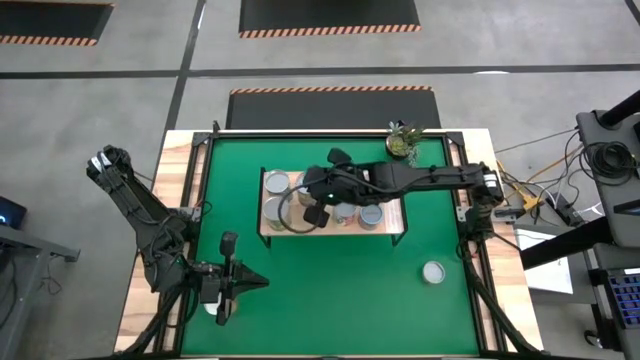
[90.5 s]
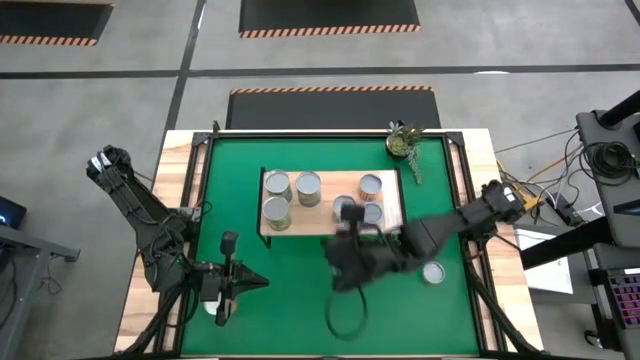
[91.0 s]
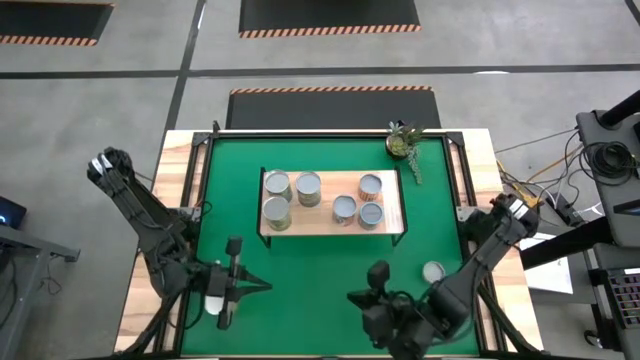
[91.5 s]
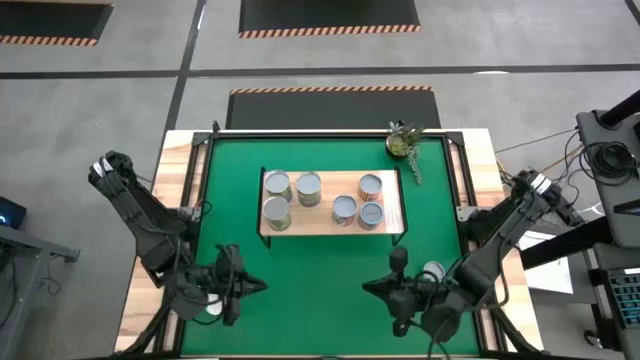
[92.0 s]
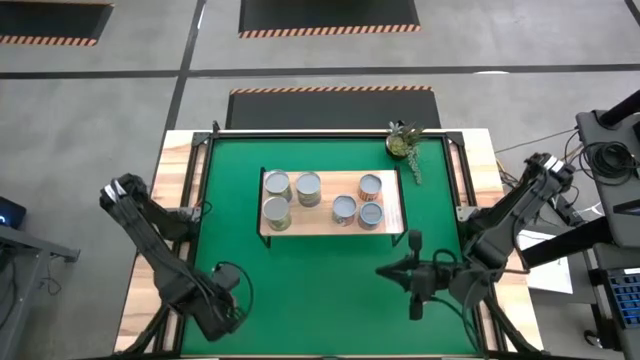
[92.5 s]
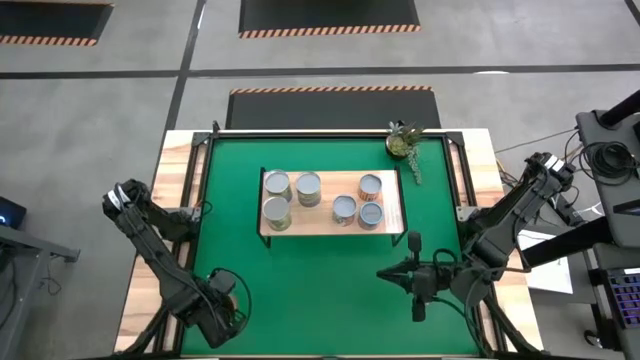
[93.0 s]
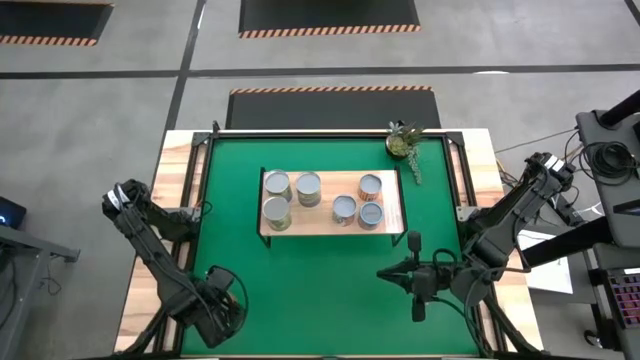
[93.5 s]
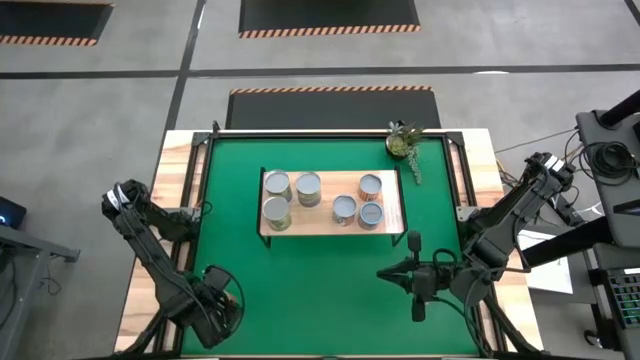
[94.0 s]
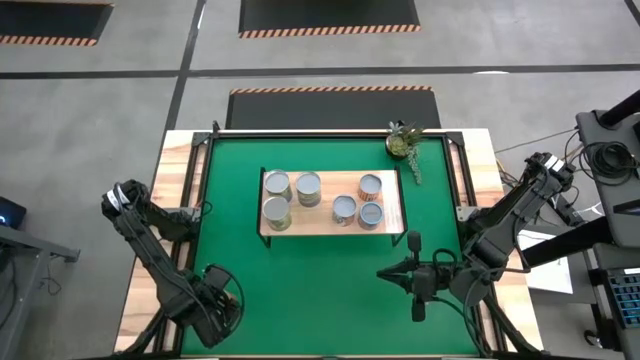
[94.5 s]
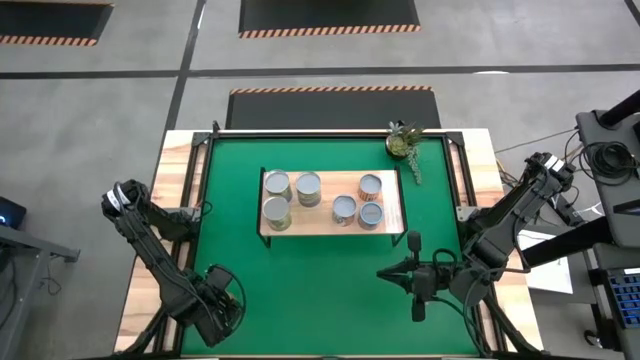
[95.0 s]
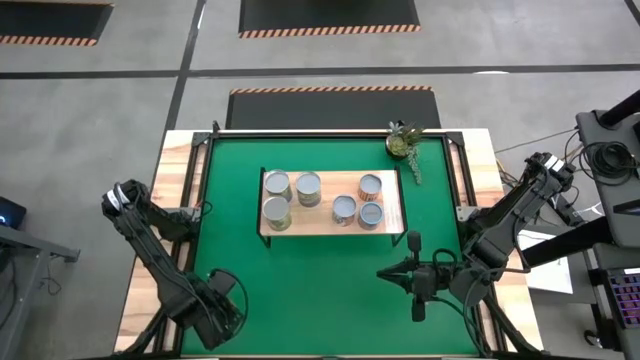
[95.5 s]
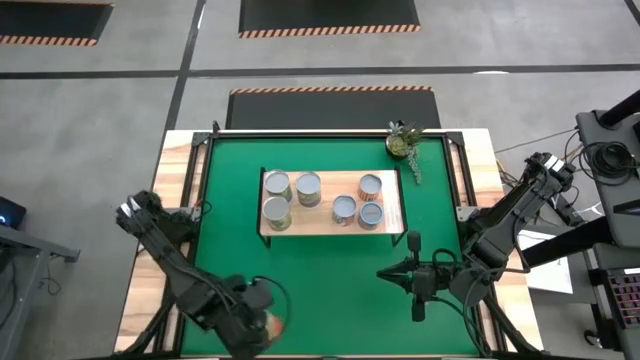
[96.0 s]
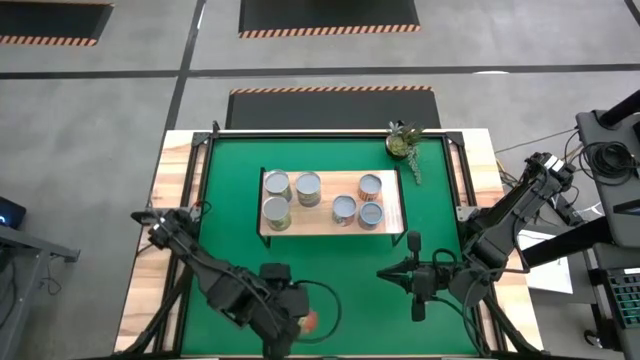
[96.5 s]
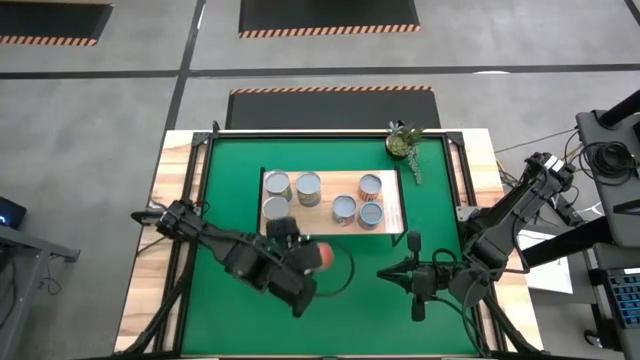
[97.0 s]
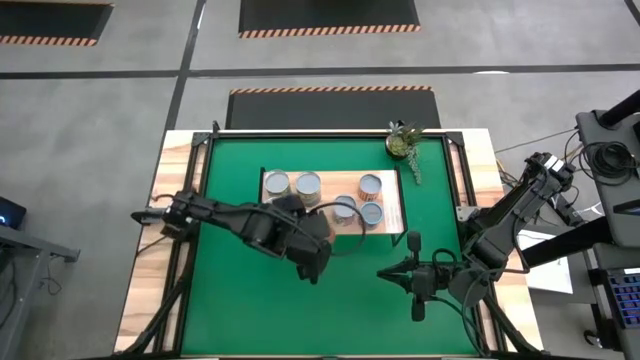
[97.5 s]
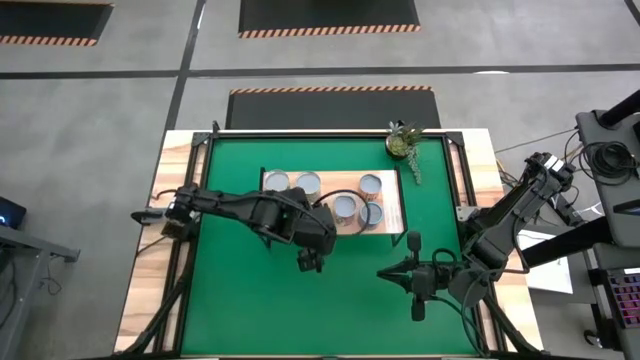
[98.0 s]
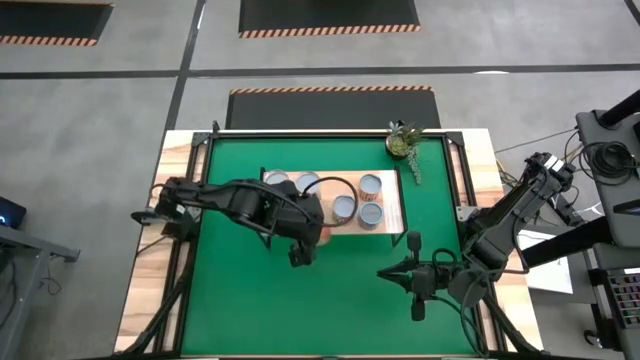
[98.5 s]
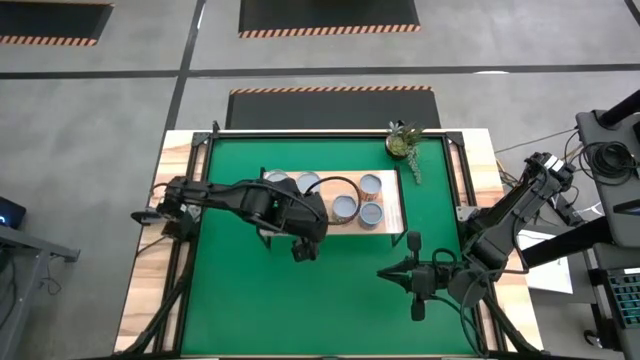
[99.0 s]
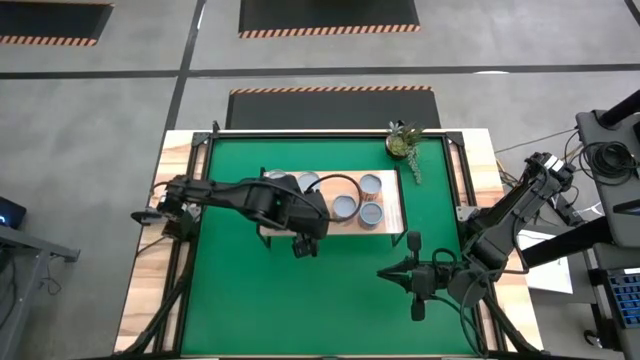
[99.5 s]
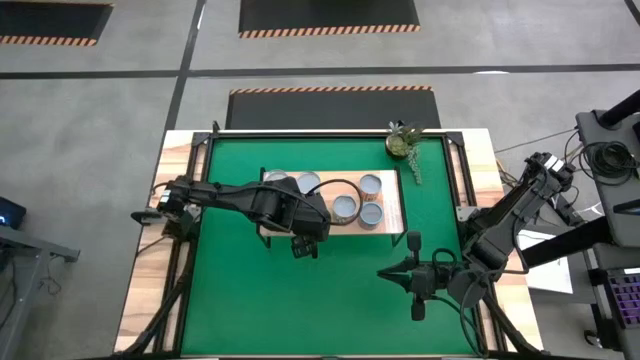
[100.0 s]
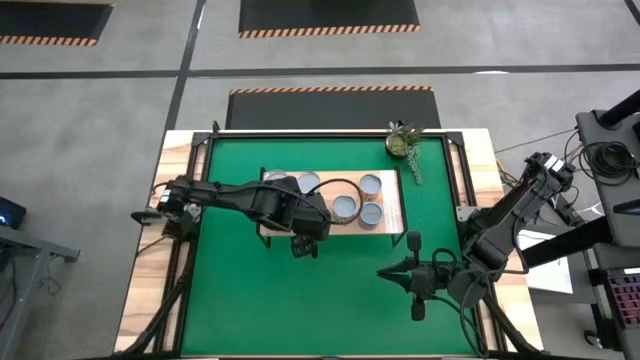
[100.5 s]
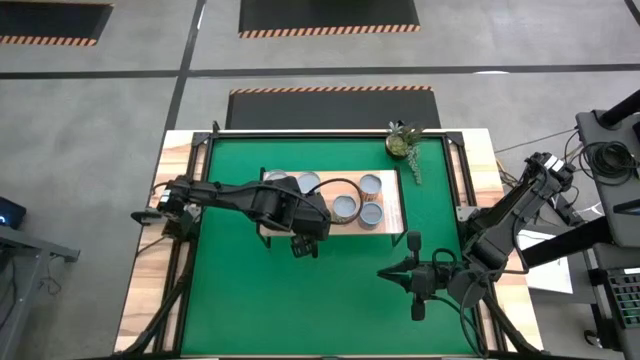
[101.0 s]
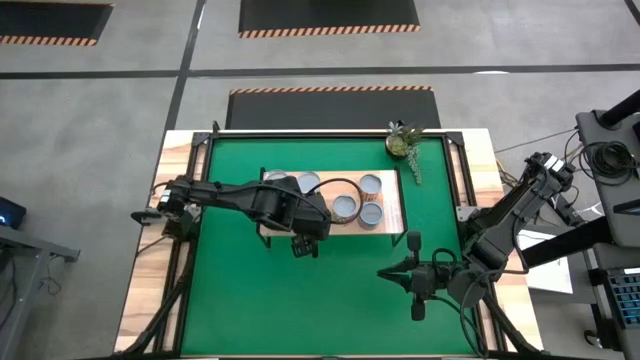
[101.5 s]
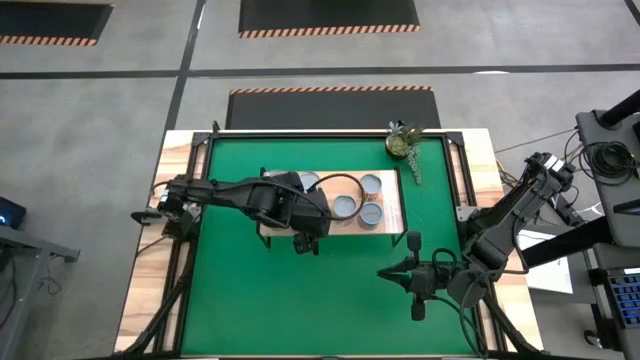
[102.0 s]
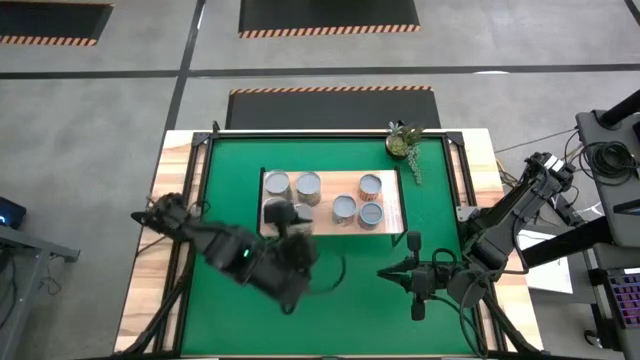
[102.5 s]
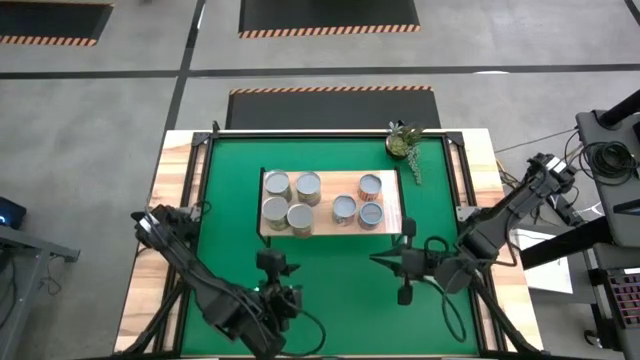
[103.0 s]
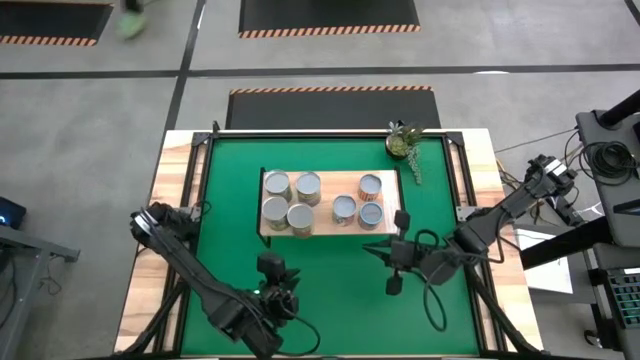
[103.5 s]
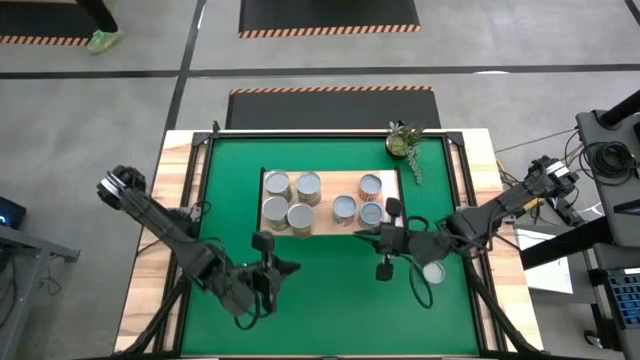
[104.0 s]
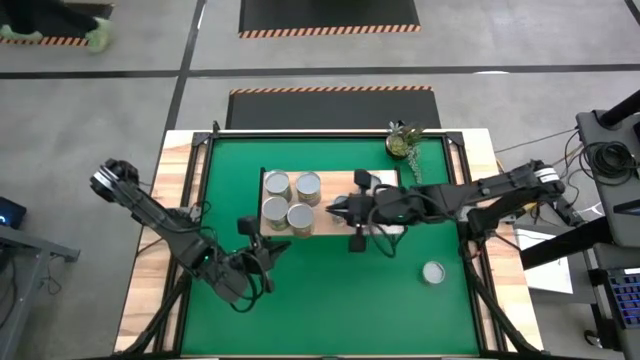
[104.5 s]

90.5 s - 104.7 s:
Task: Pick and place cans onto a shelf
Put the canned pineapple on the shelf

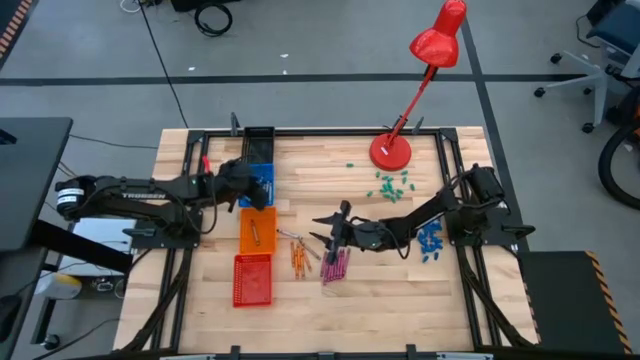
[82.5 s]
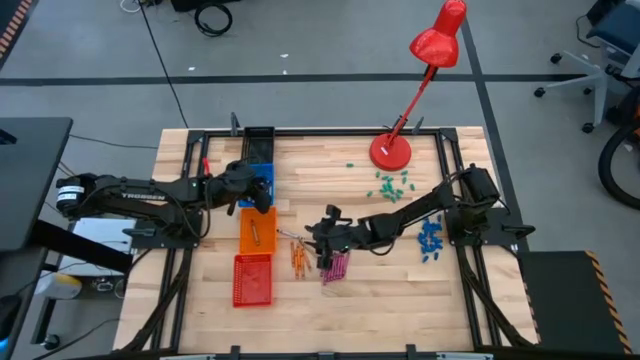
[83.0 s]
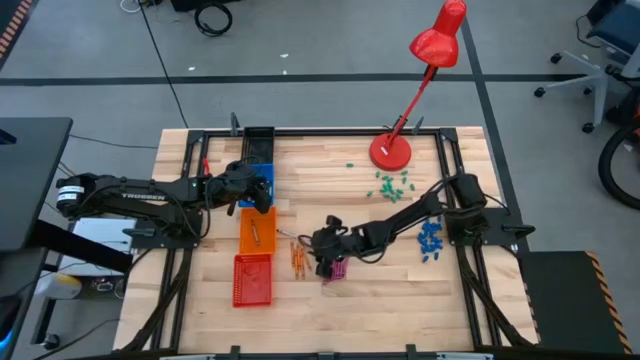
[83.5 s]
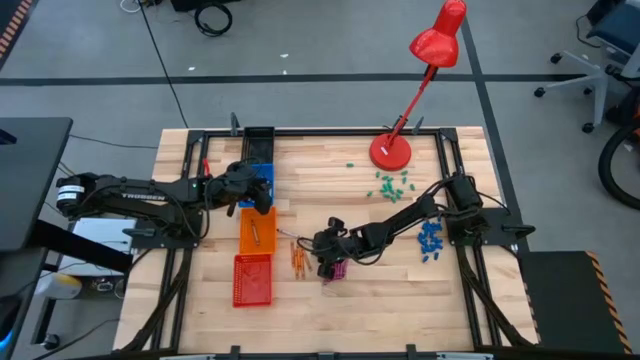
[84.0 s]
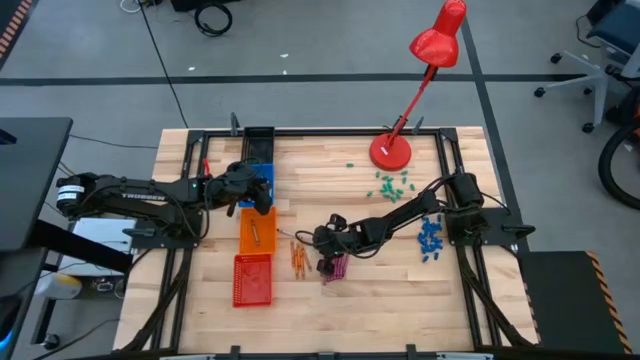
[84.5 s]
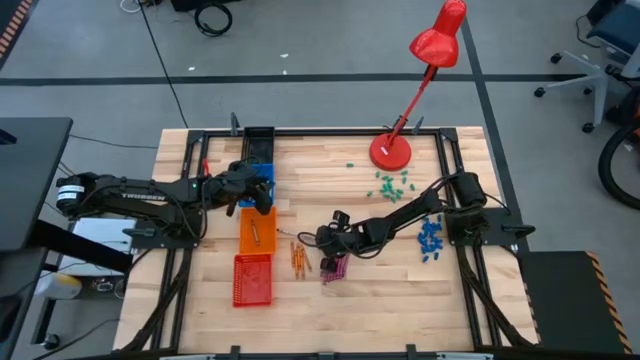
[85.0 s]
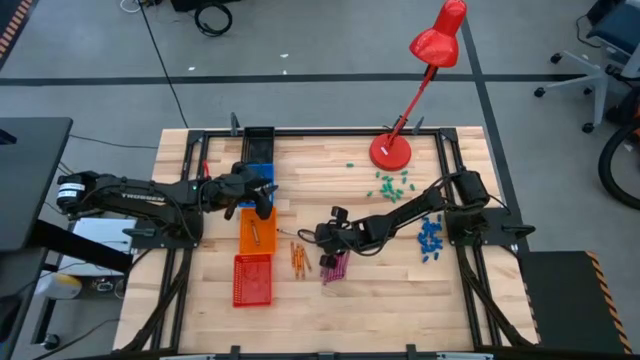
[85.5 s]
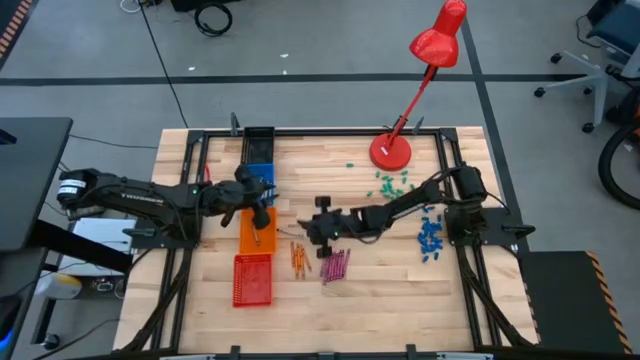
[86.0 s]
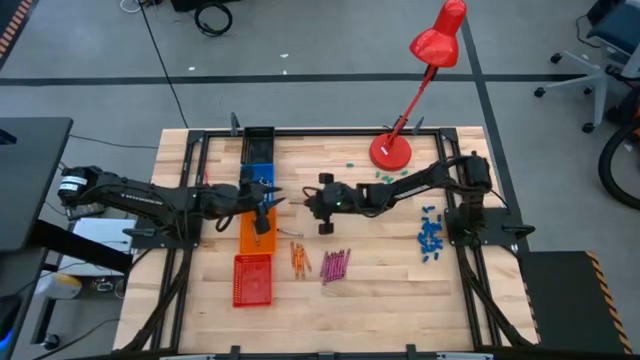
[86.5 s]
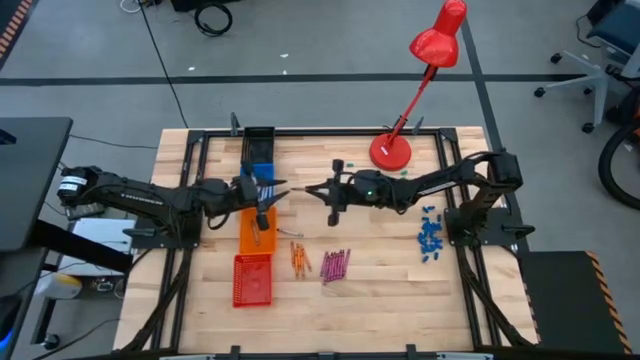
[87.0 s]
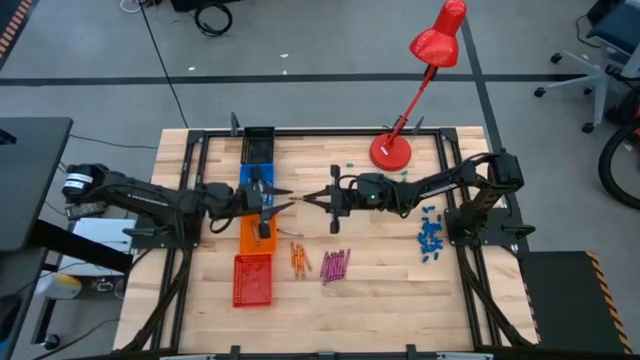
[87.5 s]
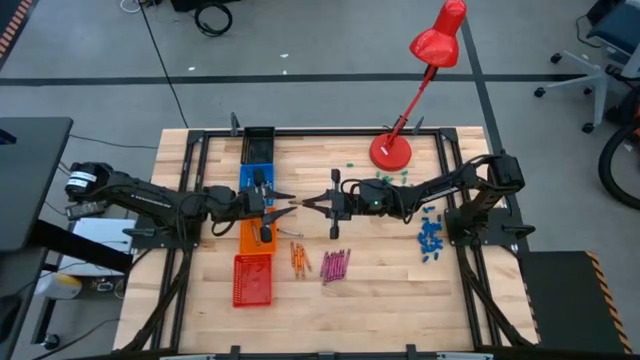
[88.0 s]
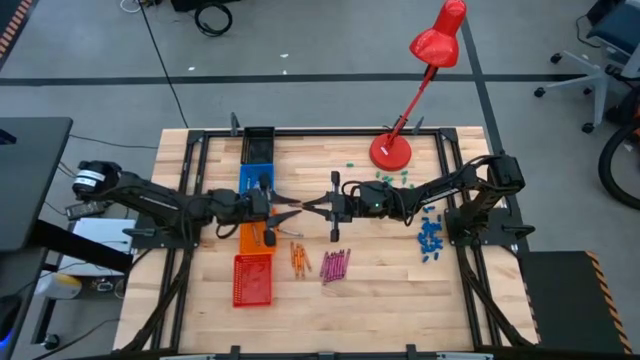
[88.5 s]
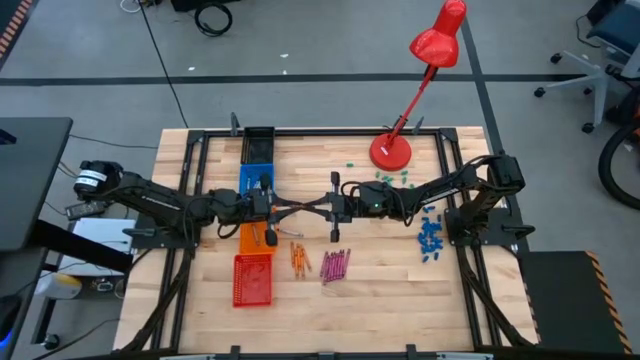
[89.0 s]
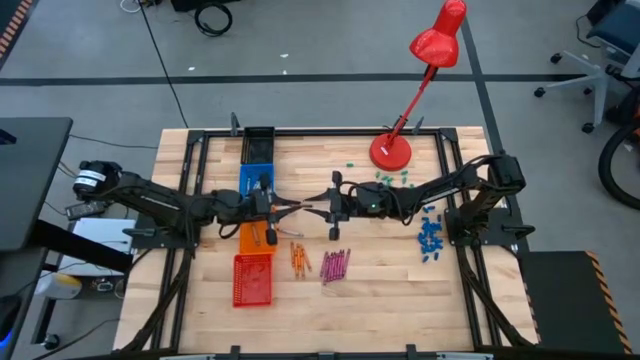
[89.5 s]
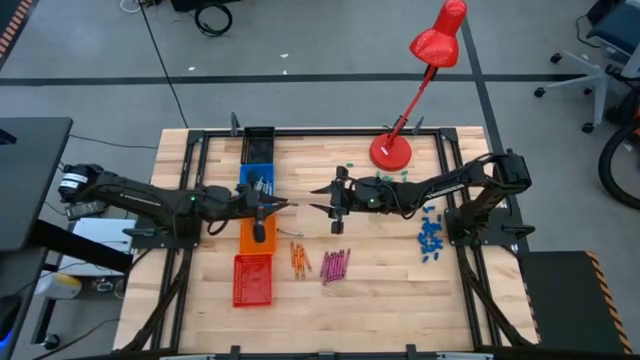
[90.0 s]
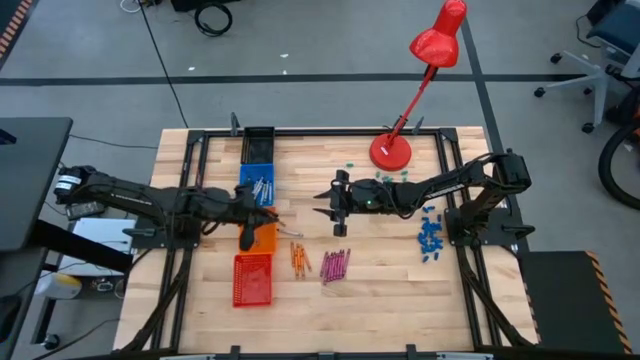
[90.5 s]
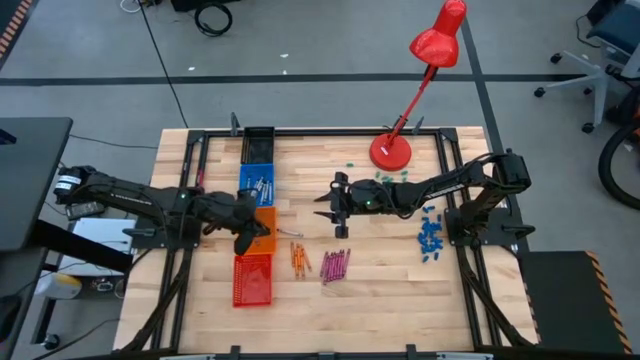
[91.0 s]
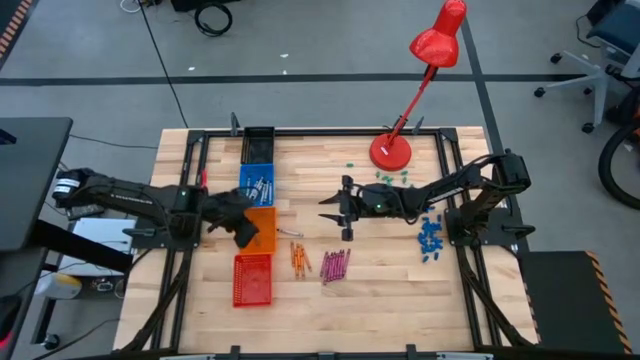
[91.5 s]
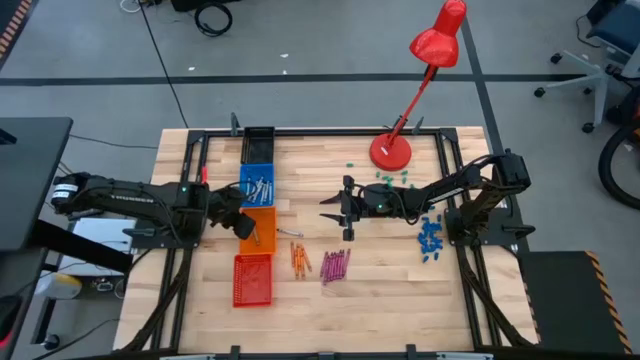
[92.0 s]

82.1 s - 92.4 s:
Task: Sort crayons
Put the brown crayon into the orange bin
